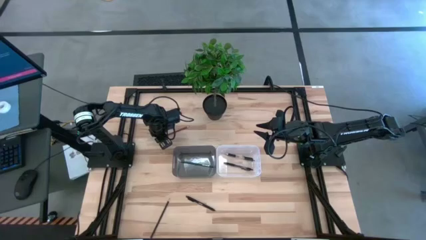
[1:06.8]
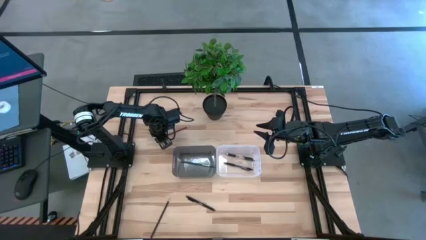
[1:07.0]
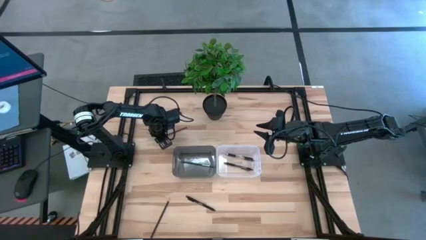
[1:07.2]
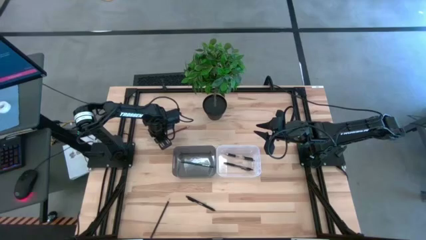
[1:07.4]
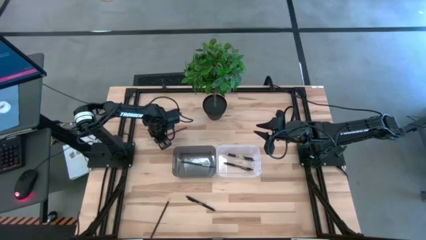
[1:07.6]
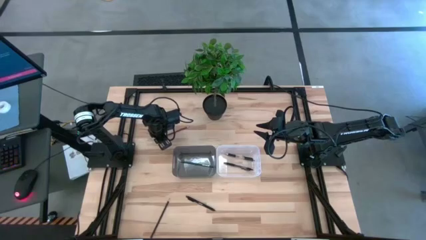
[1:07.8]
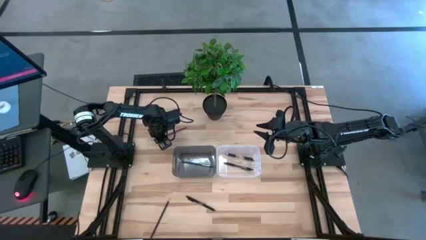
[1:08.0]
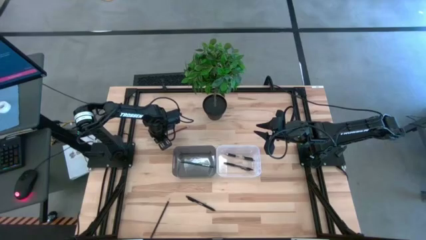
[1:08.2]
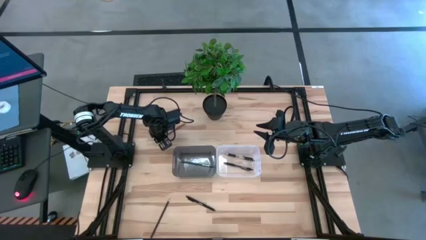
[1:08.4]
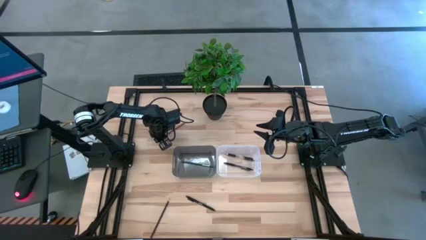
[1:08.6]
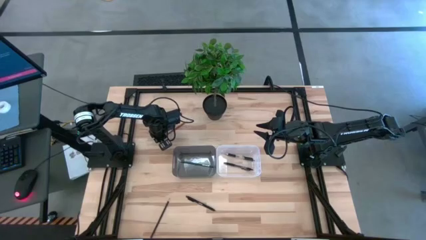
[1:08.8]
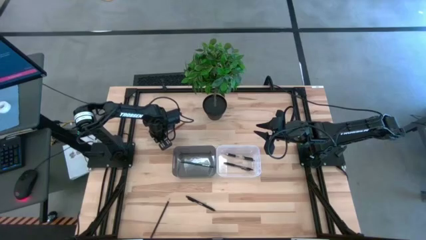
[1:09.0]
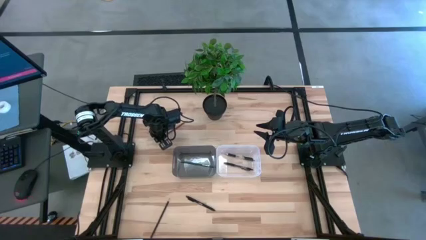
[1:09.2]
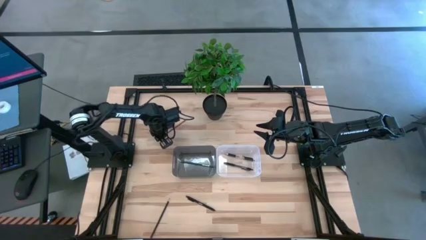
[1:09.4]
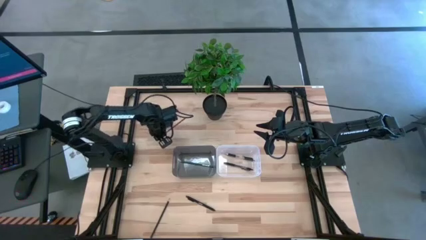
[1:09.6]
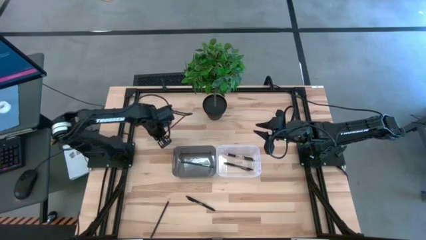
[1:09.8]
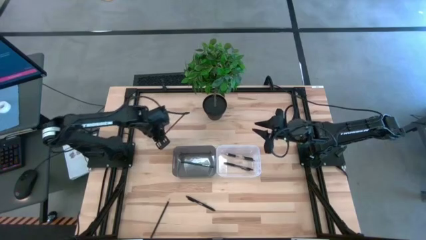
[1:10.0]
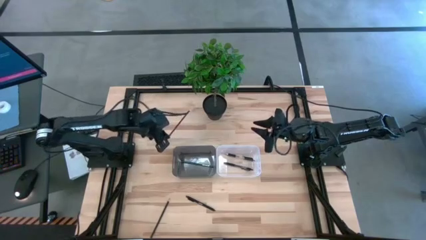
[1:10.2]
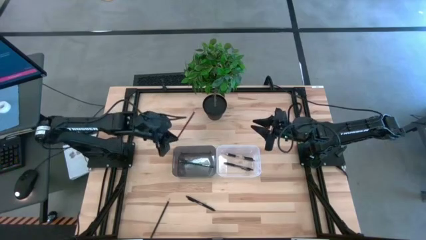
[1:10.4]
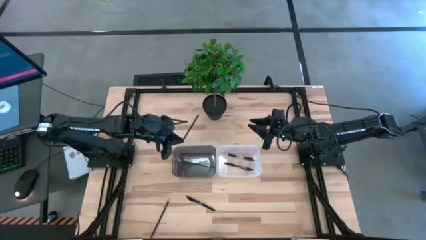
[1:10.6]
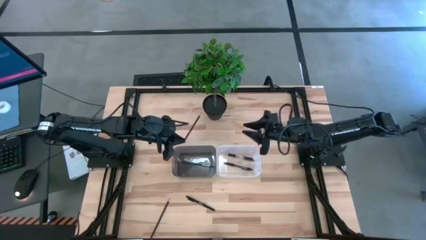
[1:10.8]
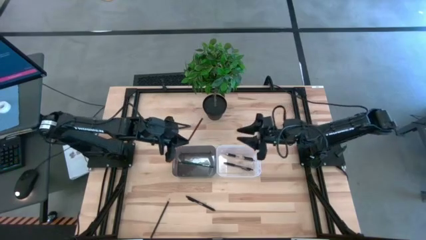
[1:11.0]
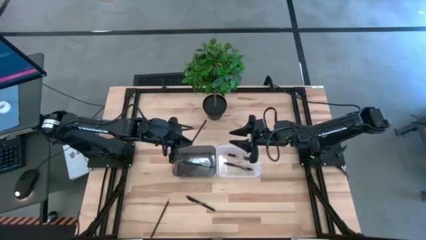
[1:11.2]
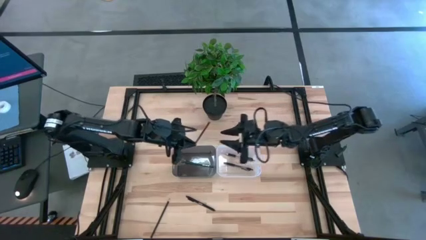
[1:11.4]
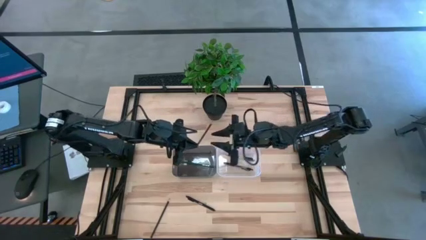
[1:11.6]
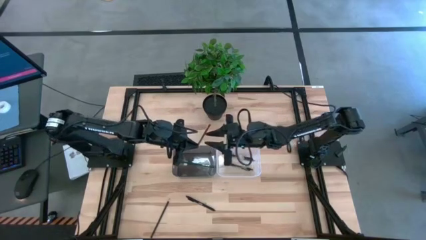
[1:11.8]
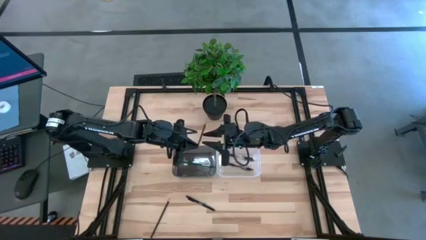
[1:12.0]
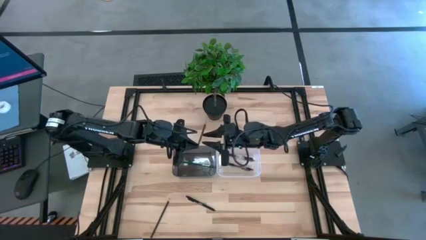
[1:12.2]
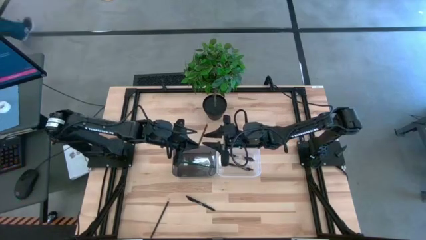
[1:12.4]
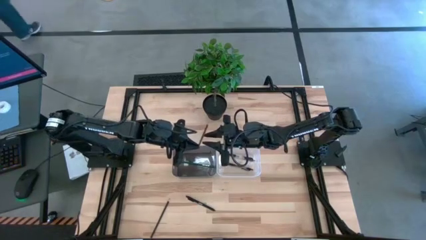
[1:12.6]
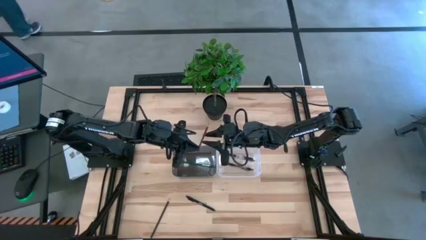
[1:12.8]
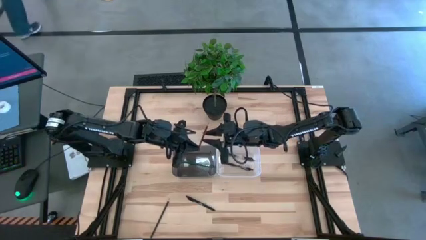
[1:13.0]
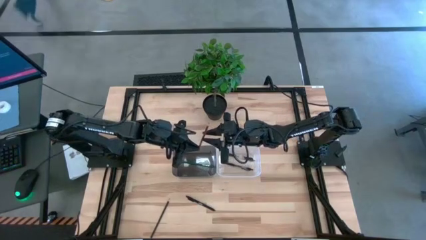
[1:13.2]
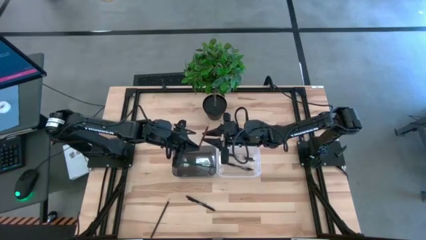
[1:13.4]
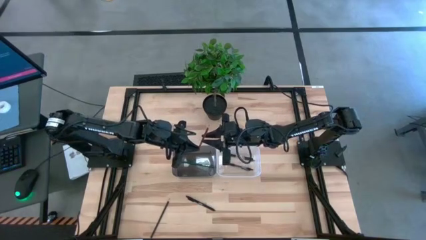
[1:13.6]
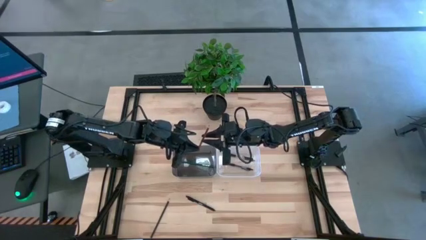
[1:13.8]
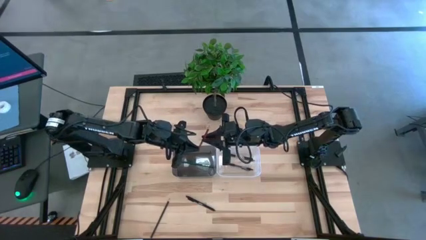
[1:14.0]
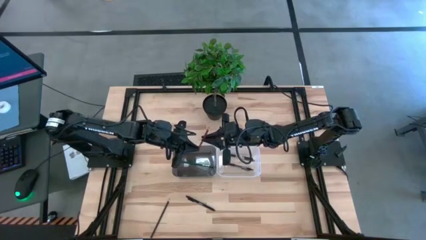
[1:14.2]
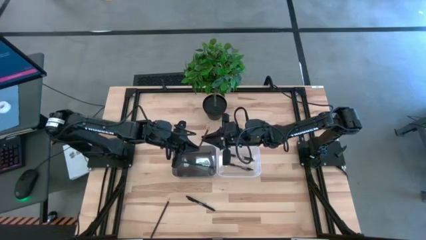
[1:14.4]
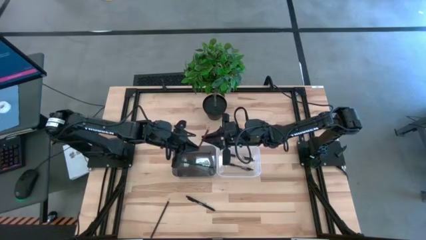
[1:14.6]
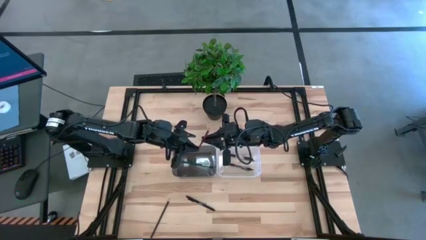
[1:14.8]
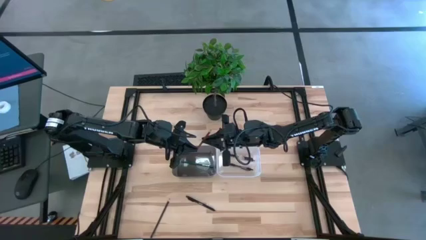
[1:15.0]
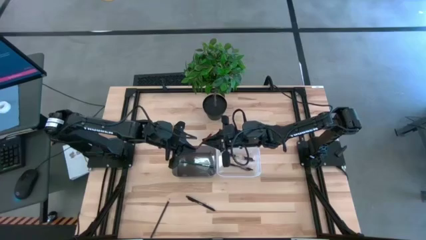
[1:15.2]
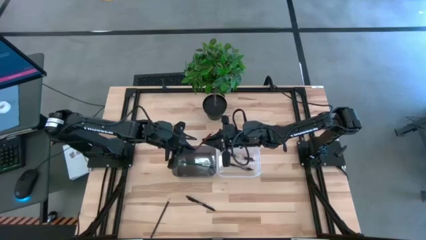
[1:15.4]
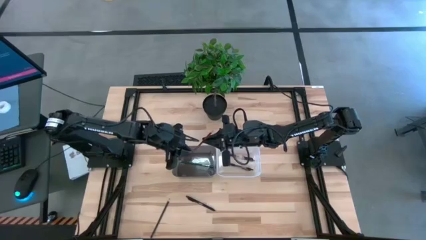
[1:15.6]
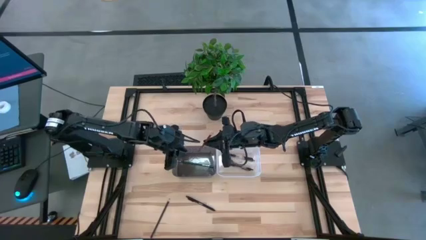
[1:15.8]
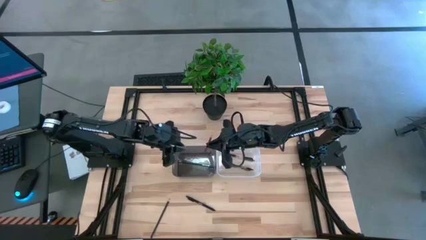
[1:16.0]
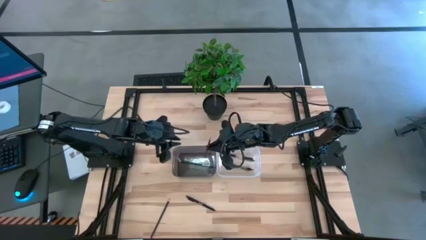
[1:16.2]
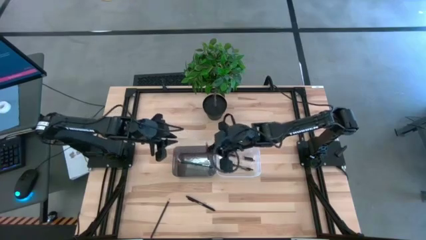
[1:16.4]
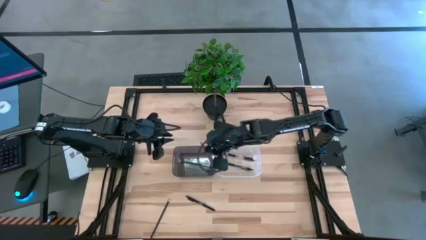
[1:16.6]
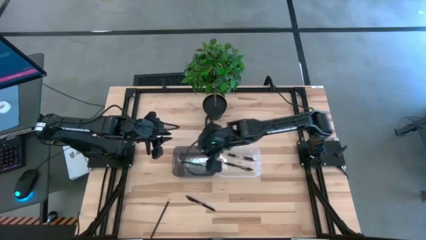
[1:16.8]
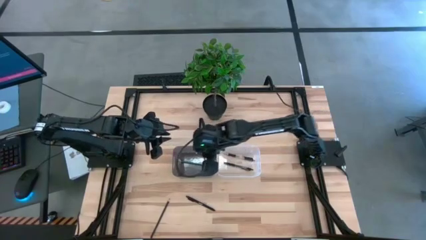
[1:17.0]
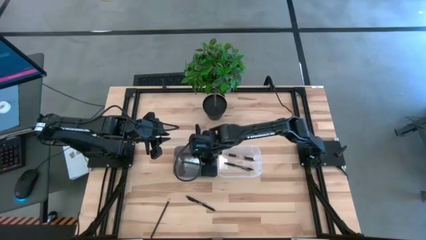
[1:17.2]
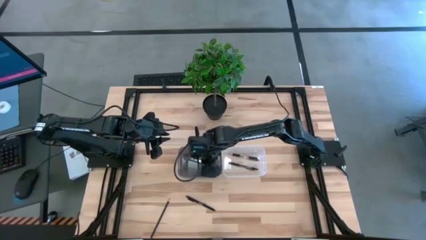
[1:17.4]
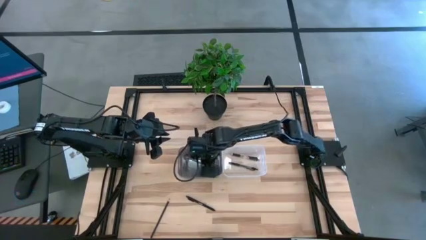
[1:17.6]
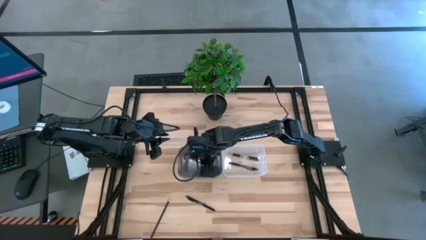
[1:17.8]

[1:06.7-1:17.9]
Task: Sort pens & pencils
Put the brown pencil into the black bin
